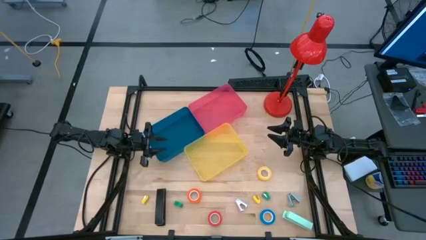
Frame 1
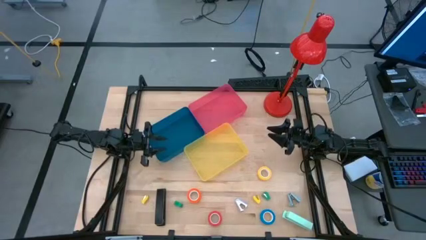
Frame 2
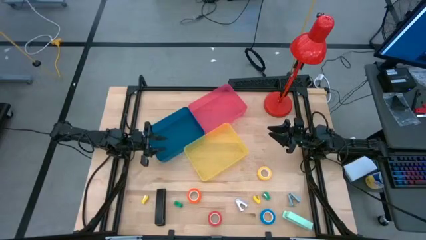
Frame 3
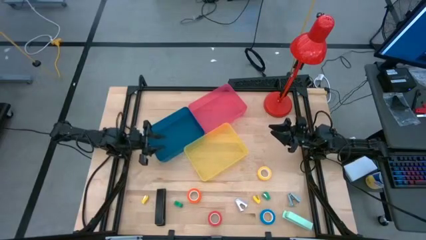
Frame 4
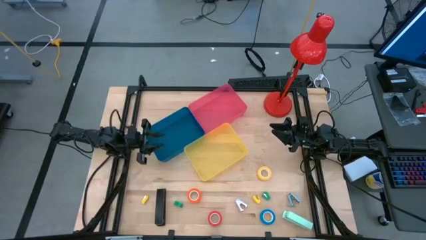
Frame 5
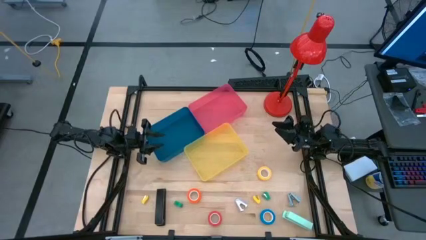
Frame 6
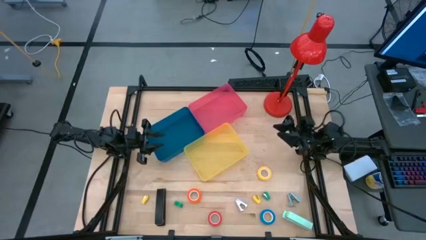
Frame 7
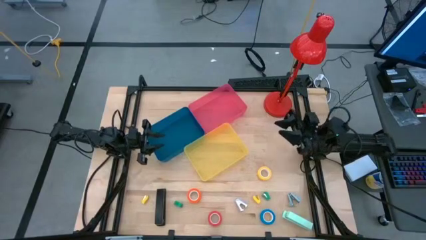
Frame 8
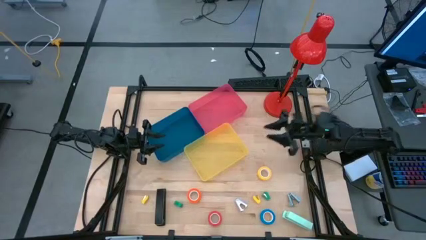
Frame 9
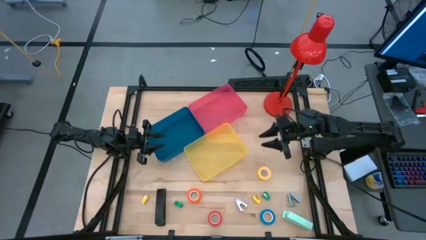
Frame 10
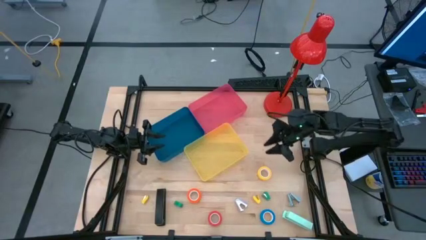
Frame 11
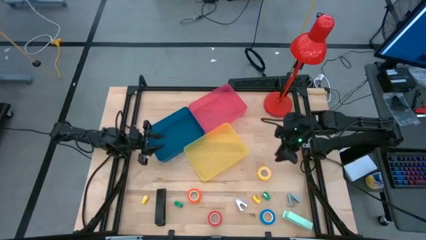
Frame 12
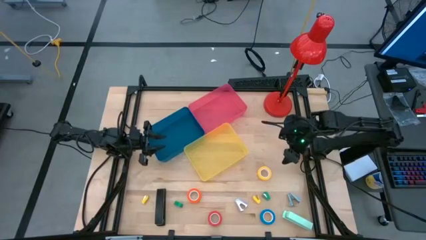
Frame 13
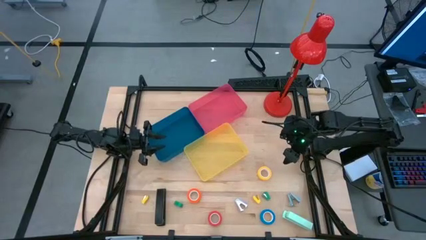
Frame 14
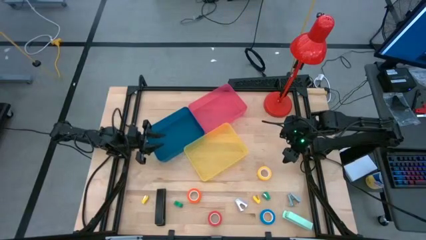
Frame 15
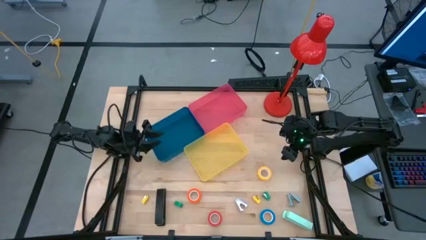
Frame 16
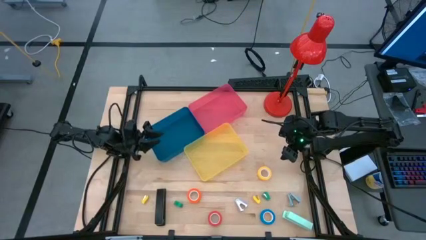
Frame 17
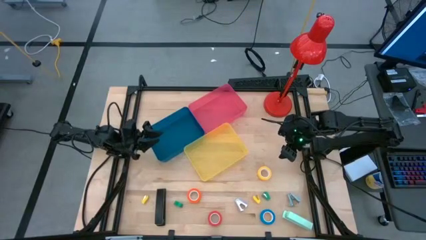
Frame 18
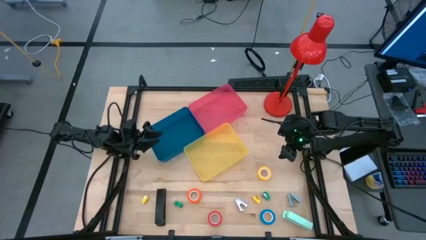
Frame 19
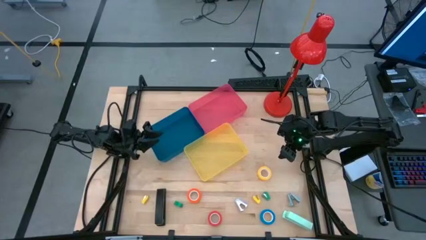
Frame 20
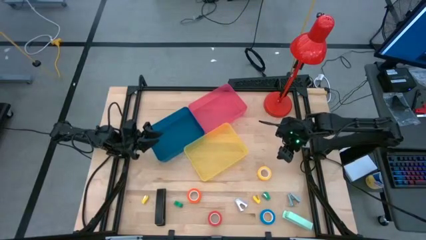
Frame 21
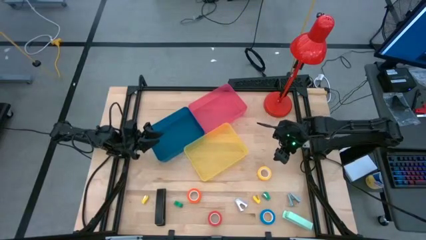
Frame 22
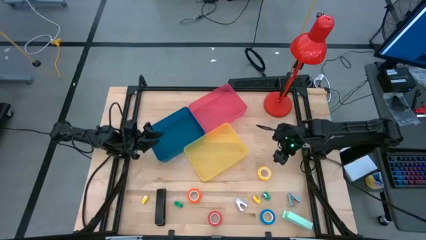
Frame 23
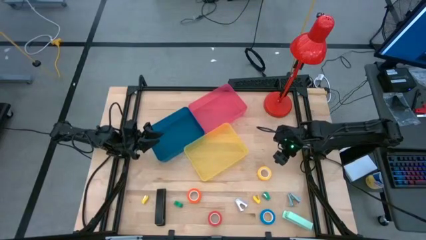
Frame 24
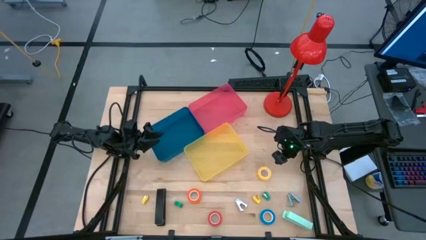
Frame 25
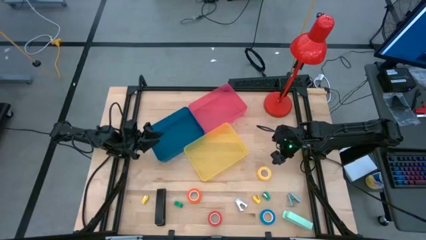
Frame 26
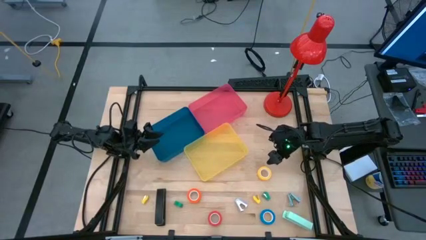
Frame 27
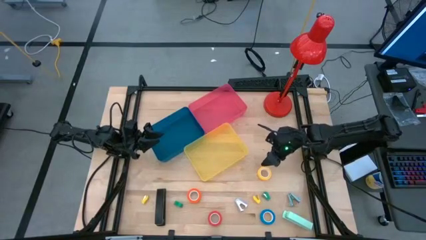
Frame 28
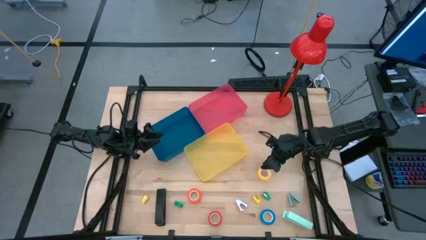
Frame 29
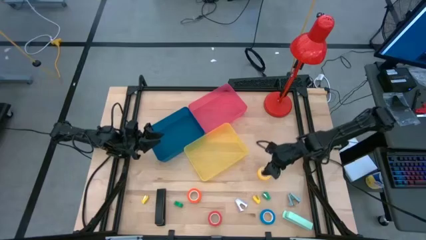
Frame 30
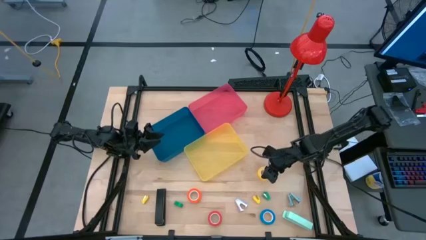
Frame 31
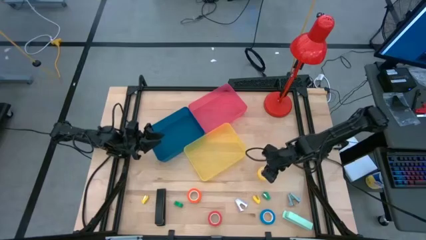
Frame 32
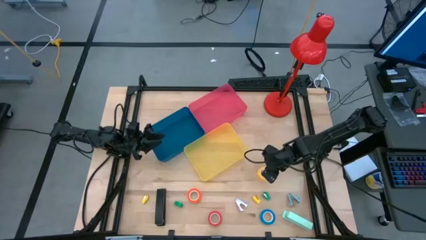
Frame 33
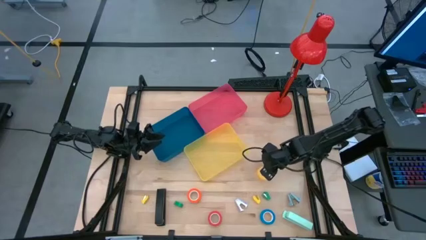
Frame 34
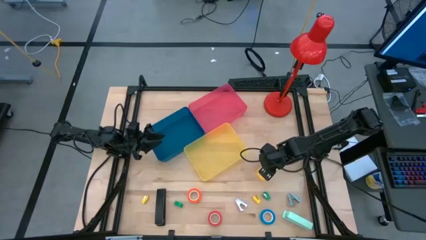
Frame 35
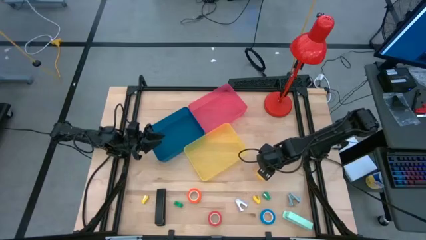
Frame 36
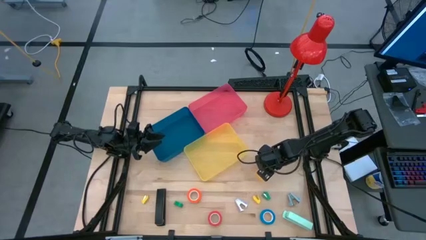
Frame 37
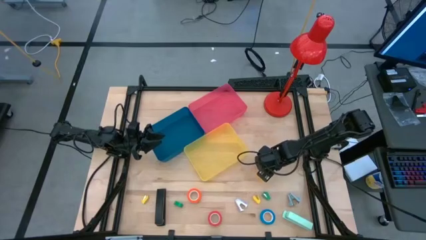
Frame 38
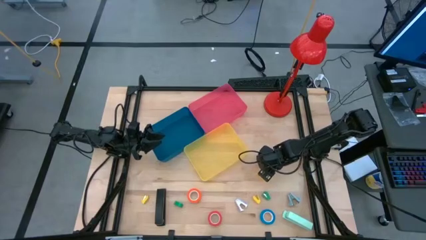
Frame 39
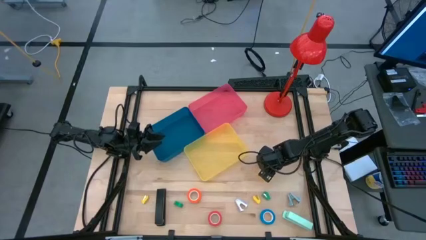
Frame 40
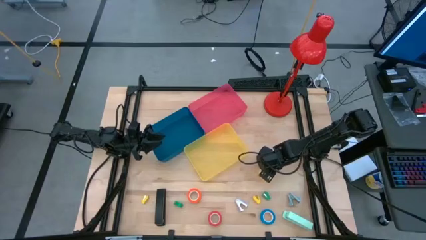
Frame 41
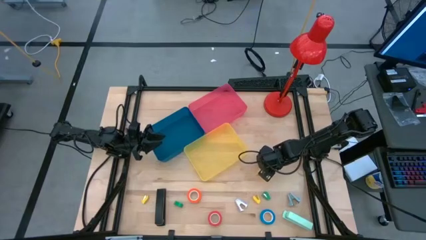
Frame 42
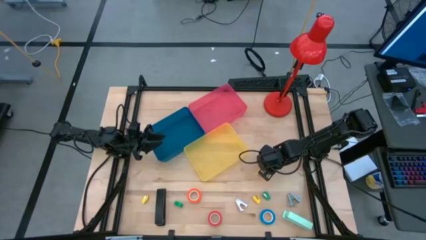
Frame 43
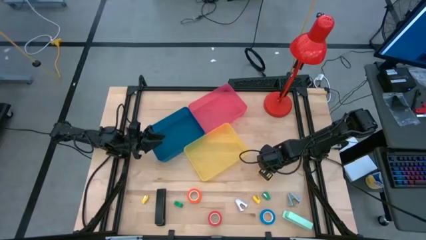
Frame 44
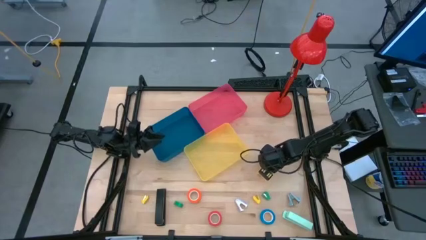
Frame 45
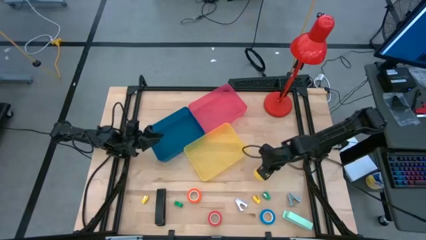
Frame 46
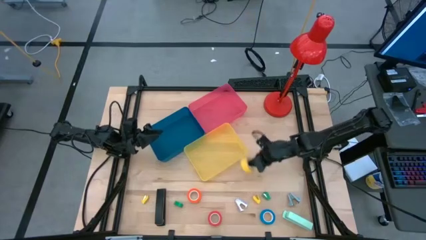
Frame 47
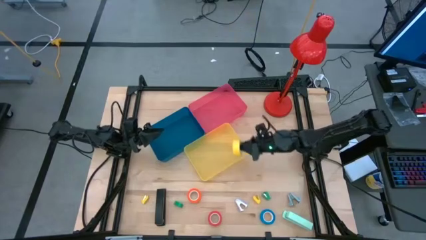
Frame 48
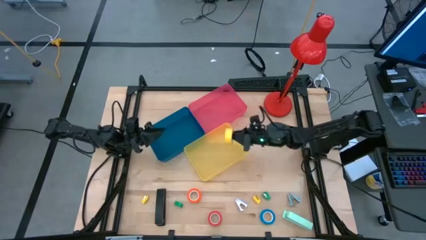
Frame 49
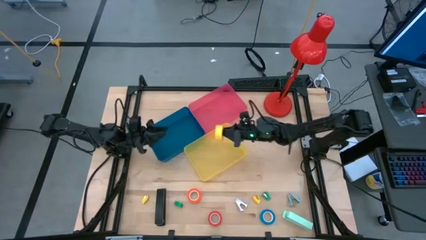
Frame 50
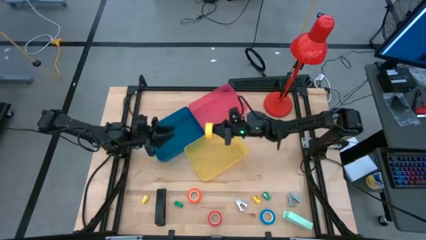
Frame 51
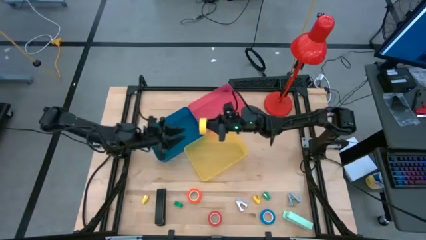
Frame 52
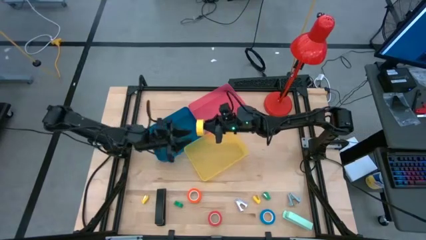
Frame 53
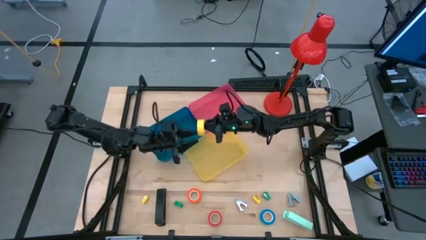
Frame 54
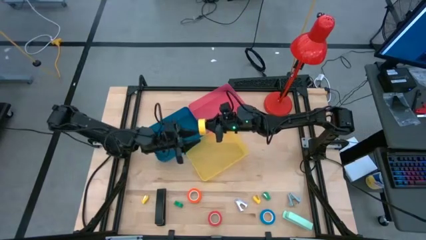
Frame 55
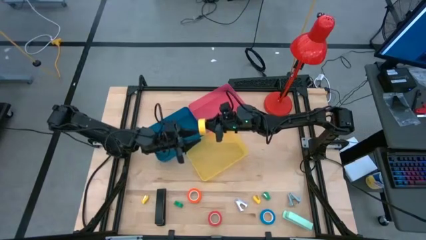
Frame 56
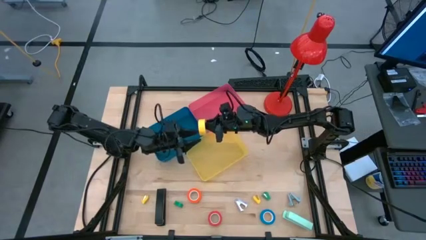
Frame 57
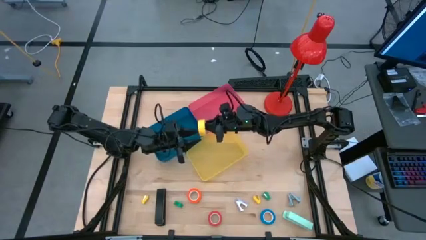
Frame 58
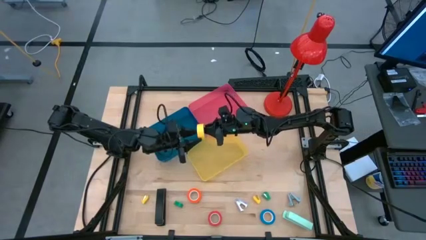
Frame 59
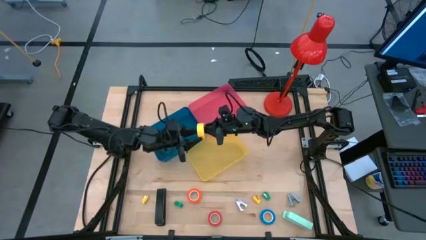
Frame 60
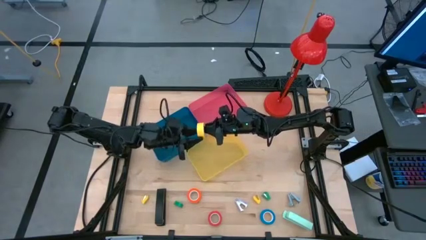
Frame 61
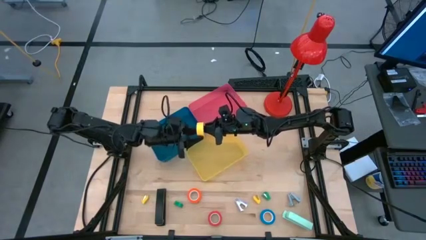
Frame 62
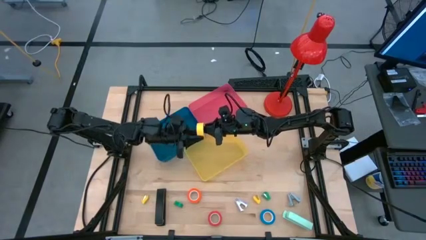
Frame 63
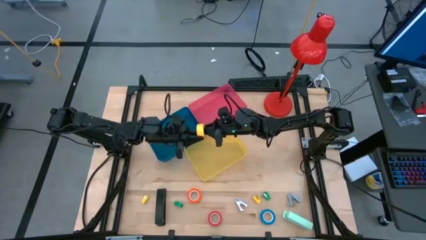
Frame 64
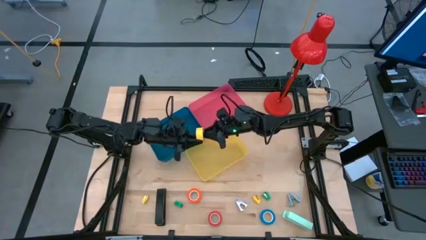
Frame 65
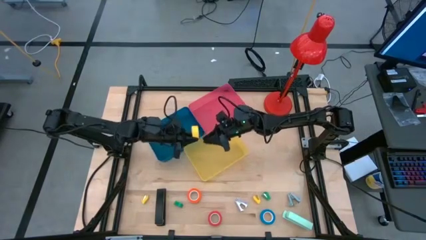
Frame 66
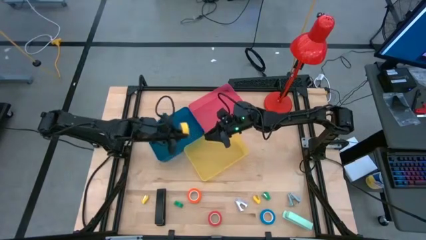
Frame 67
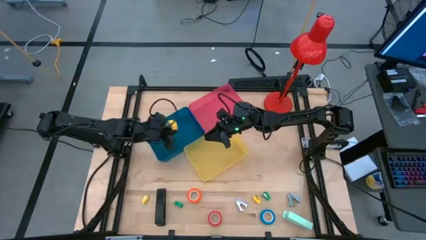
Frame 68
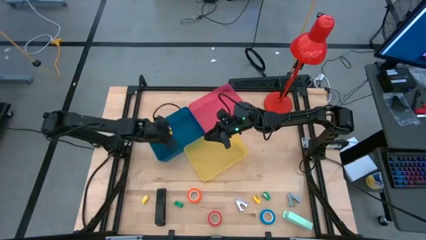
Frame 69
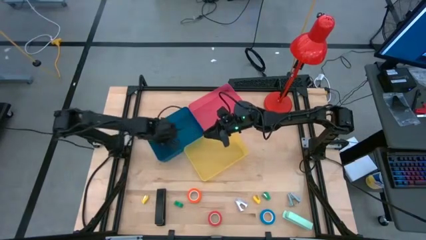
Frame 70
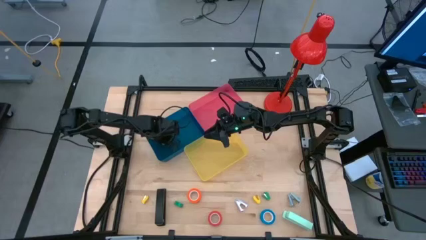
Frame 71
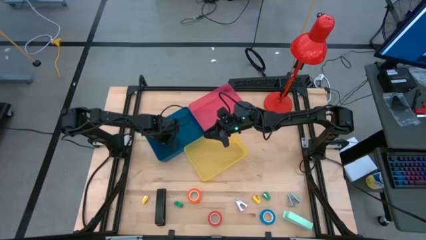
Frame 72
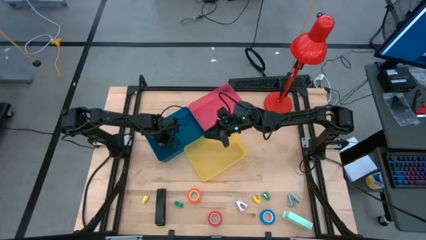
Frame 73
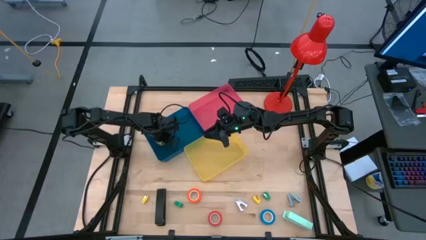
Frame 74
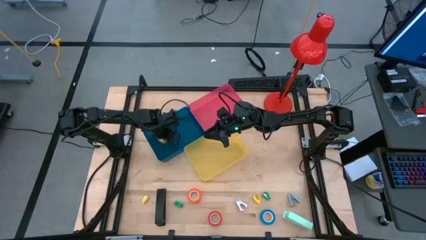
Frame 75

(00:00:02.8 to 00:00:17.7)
Task: Pick and place Stapler, Stapler remover, tape
Put the yellow tape into the blue bin
